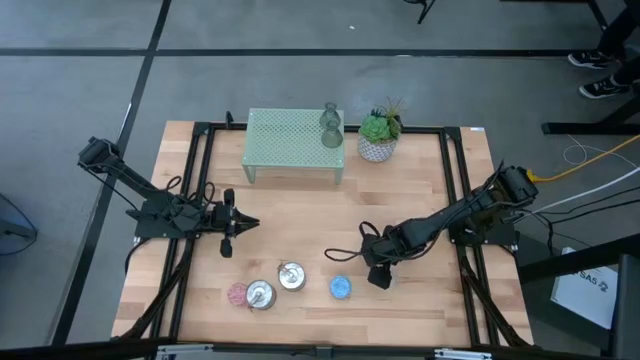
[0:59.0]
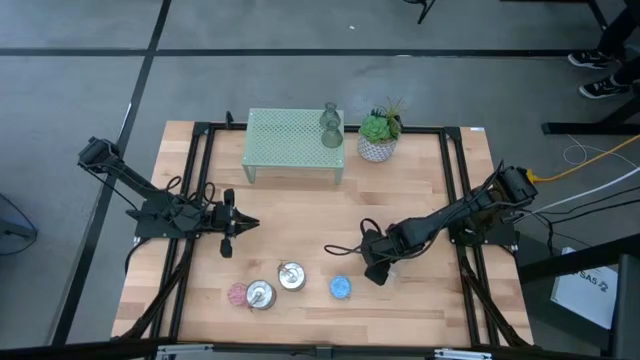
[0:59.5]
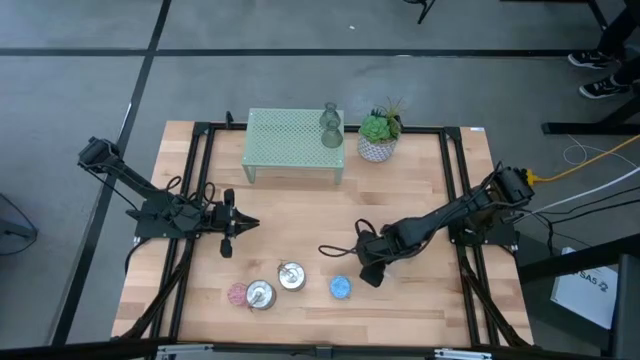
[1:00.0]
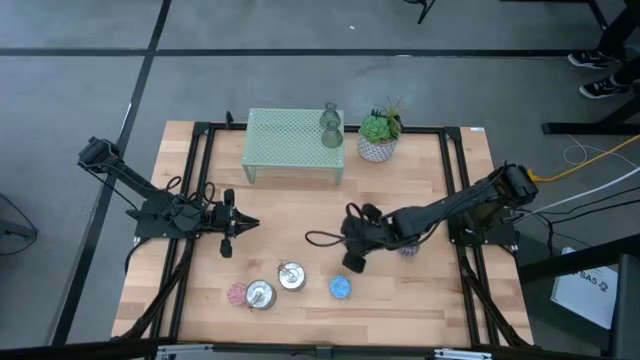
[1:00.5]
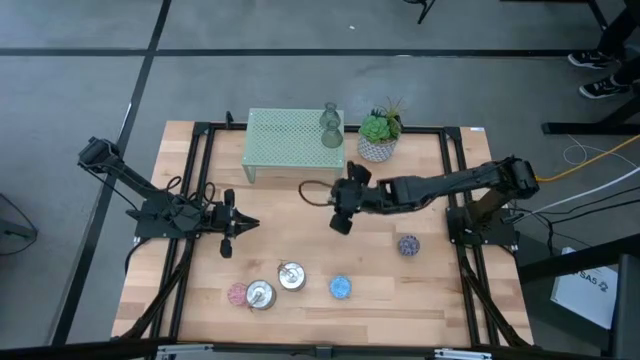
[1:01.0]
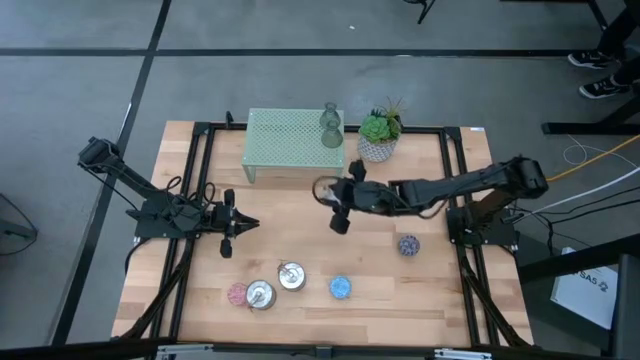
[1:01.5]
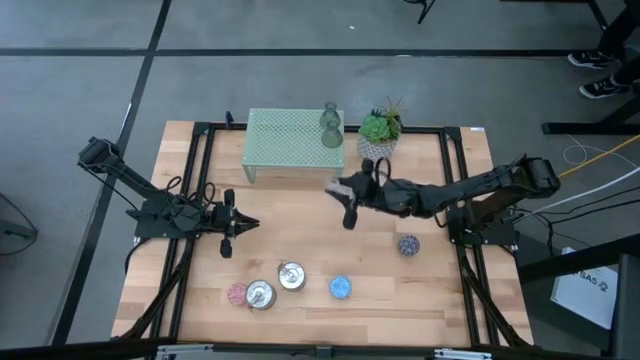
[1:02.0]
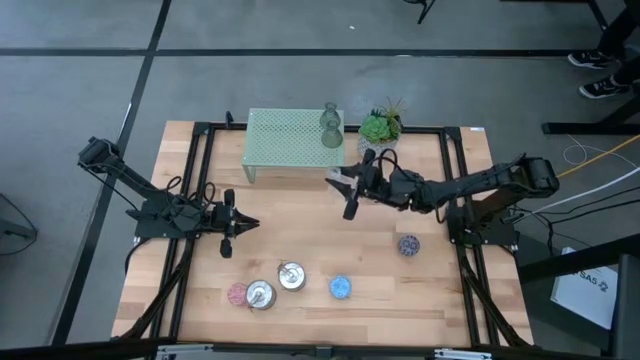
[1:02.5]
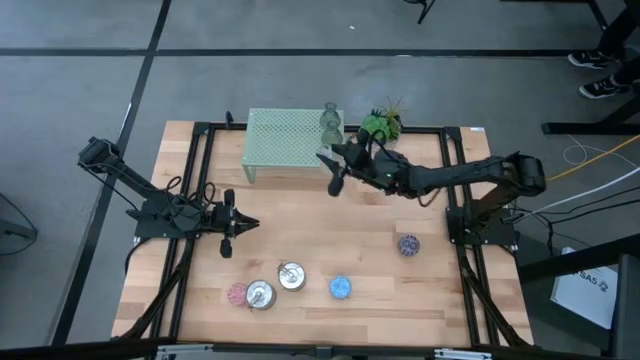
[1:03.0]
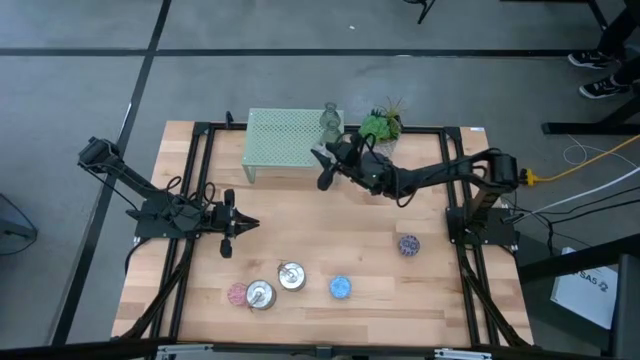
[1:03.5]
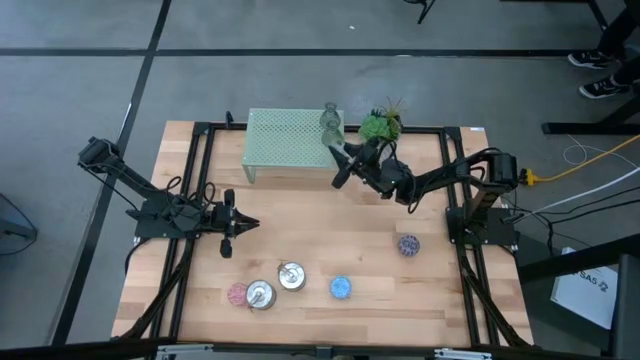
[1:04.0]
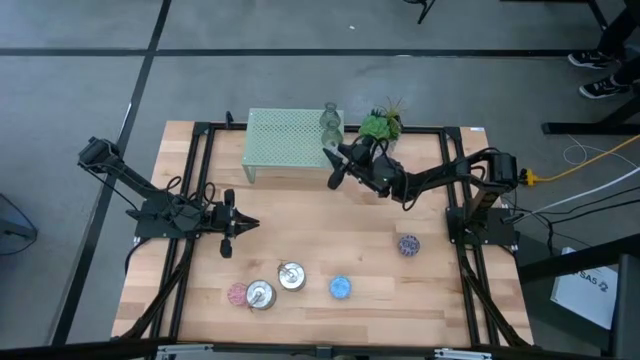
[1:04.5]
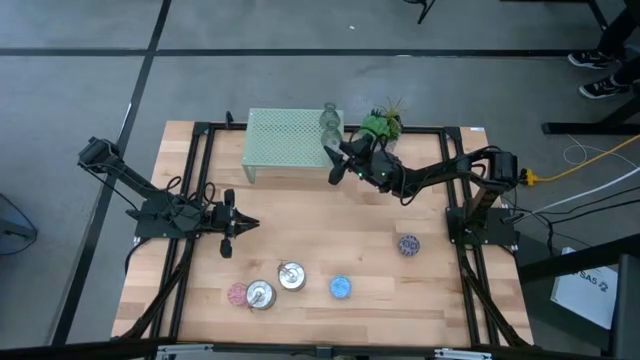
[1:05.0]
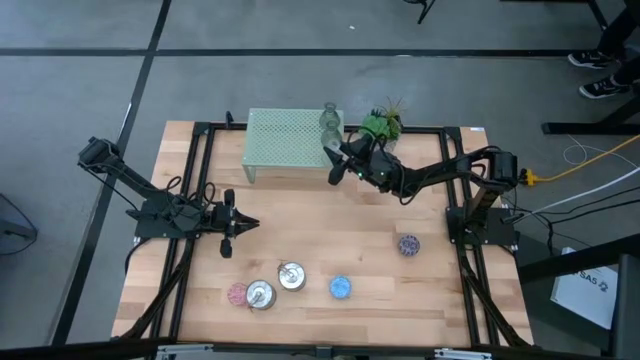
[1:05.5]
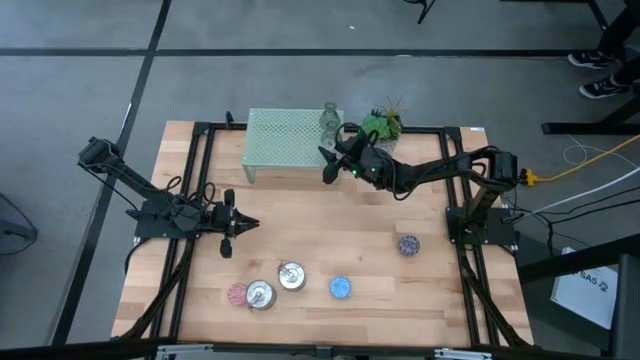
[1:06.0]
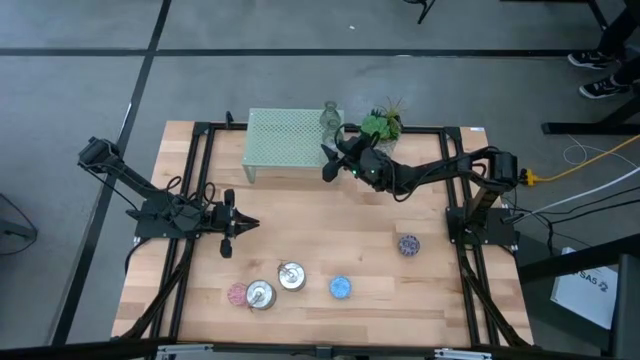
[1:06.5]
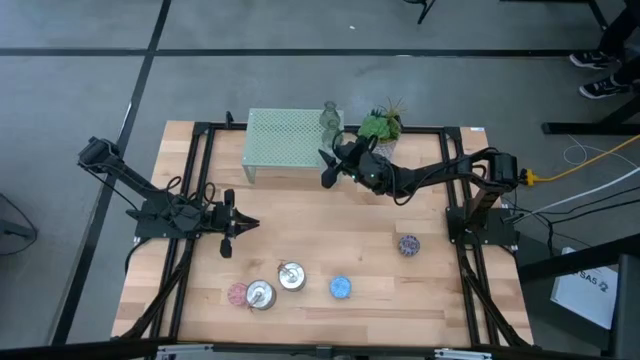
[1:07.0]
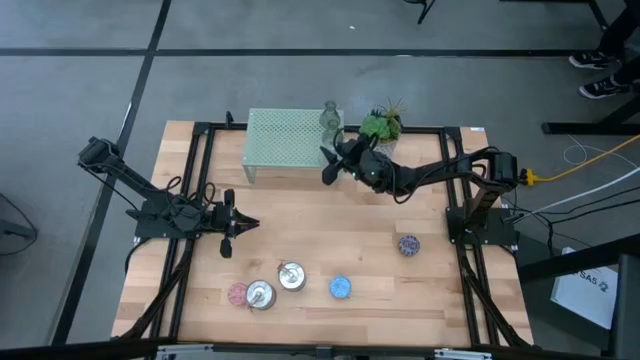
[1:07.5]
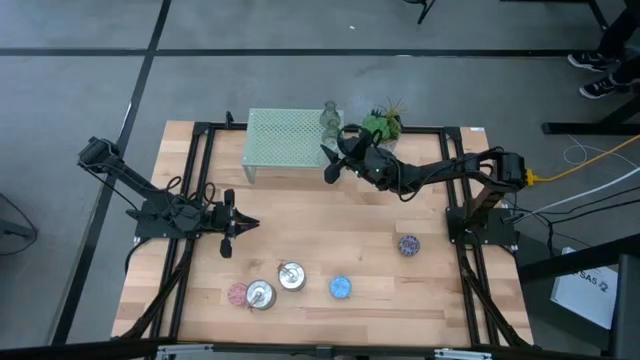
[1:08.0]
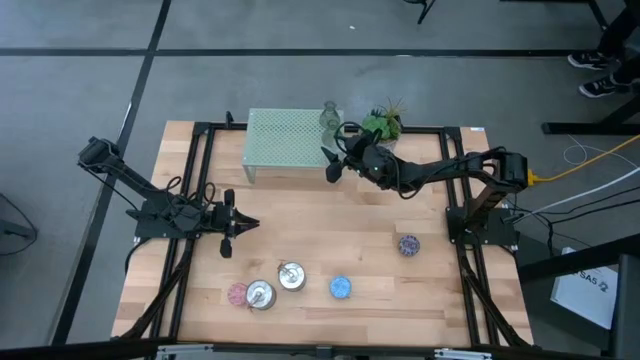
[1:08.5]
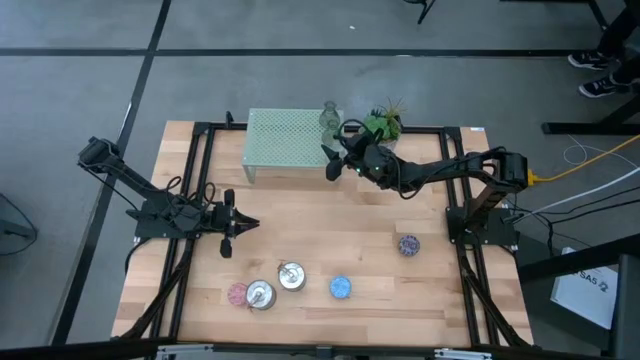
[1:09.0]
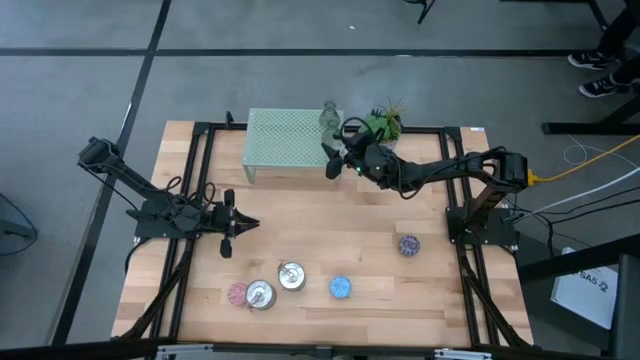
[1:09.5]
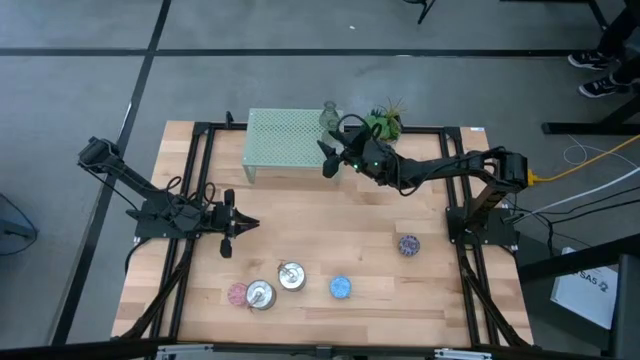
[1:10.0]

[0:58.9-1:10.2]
Task: Pick & Place candle stick holders
Put the transparent glass candle holder on the shelf

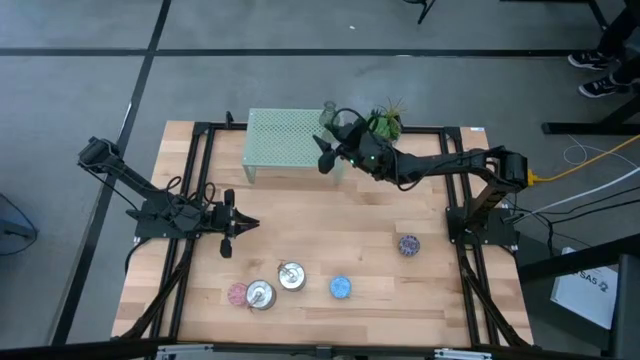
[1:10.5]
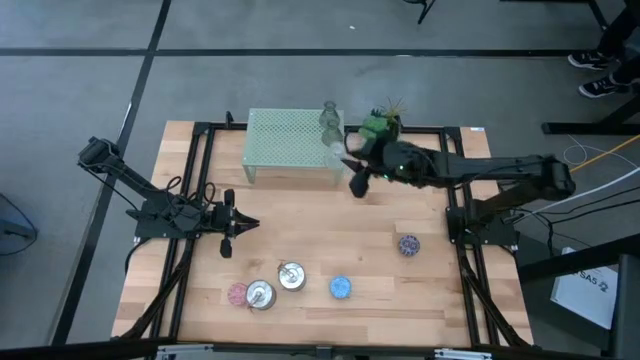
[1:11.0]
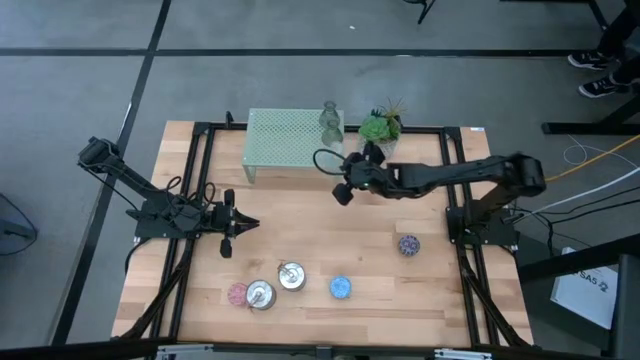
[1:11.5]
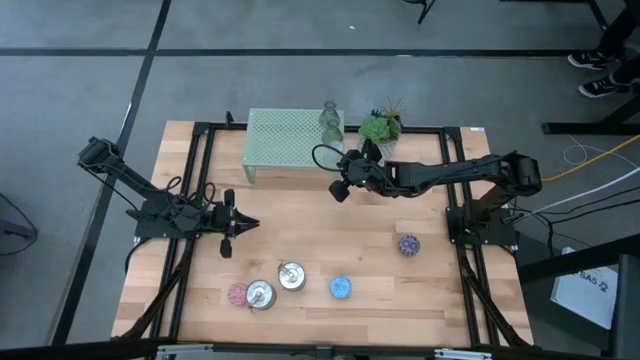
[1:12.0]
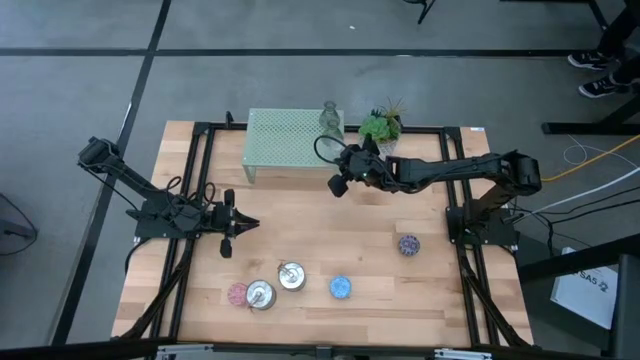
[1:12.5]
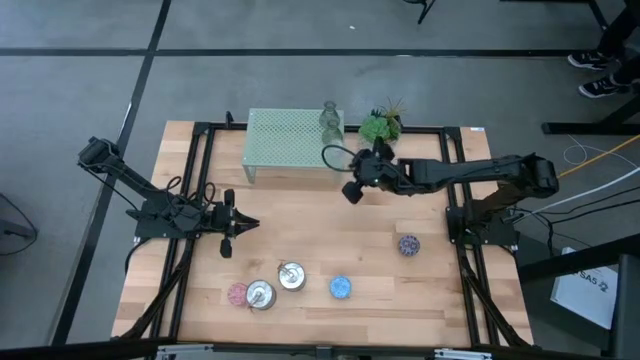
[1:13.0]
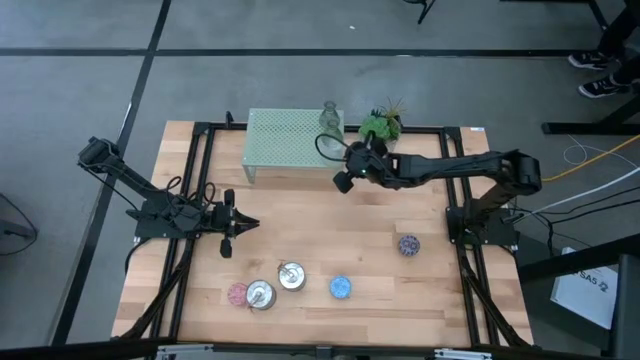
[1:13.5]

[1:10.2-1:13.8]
Adjust the transparent glass candle holder on the shelf

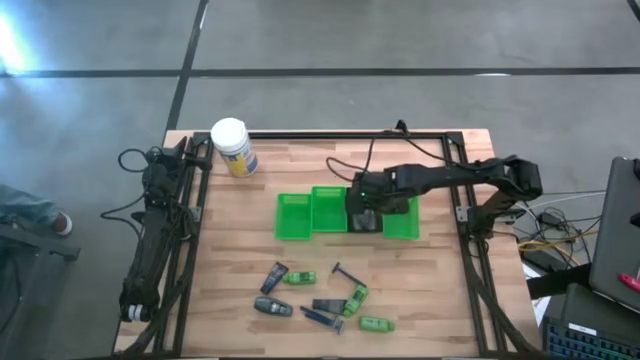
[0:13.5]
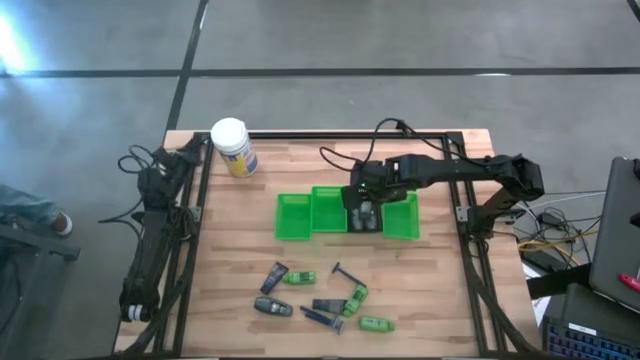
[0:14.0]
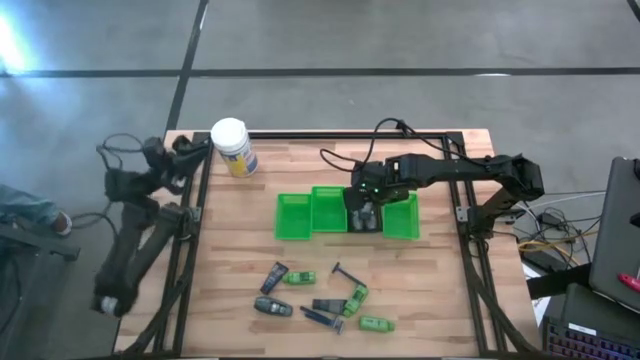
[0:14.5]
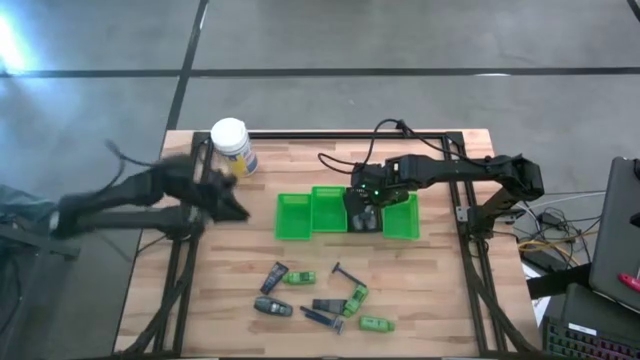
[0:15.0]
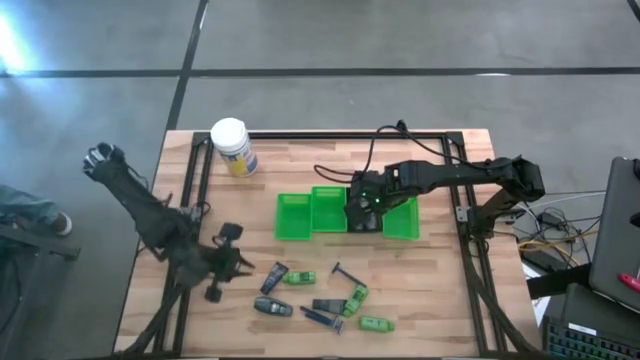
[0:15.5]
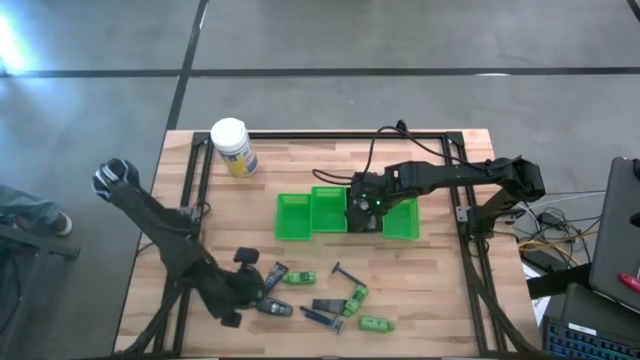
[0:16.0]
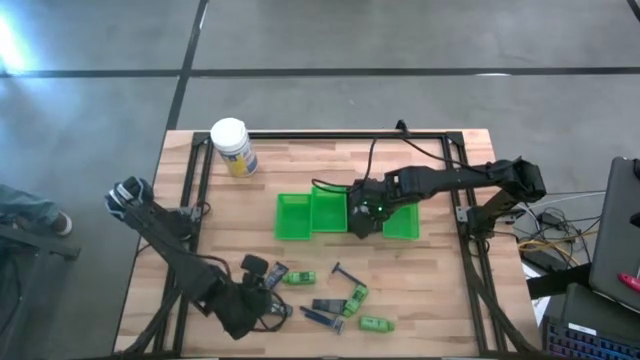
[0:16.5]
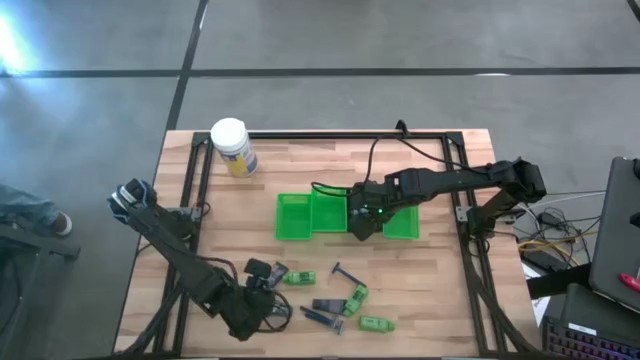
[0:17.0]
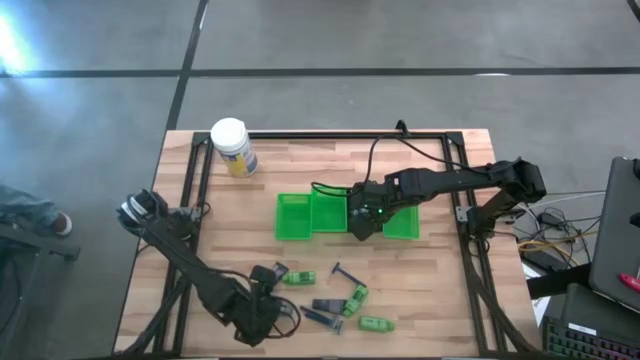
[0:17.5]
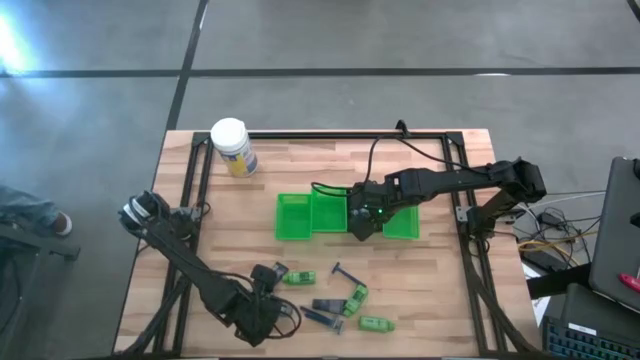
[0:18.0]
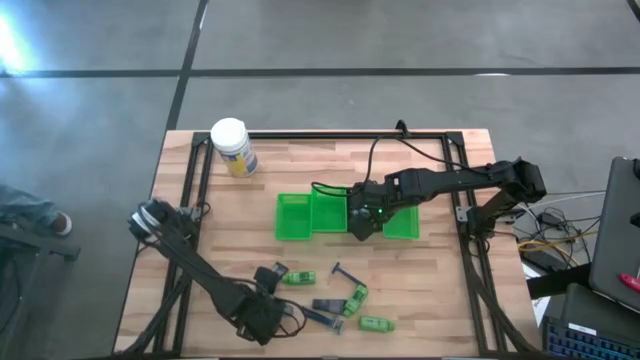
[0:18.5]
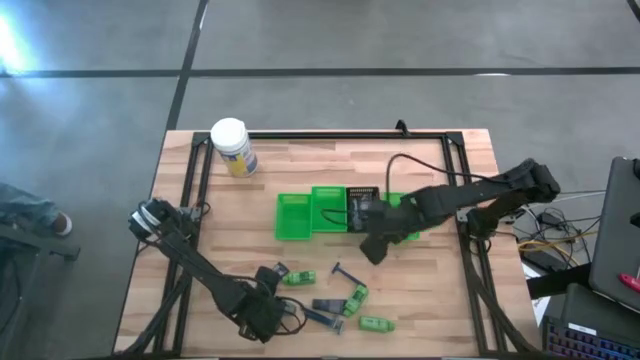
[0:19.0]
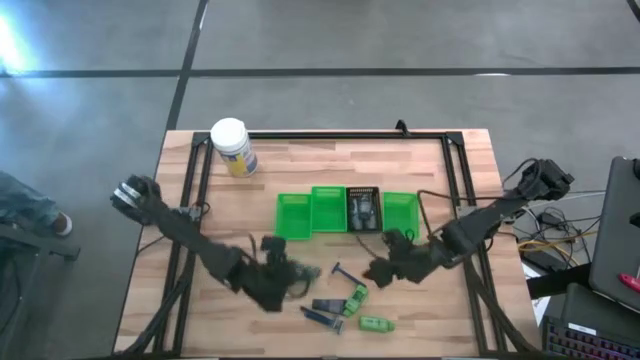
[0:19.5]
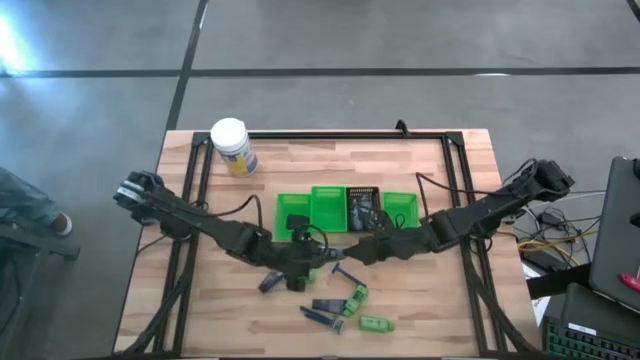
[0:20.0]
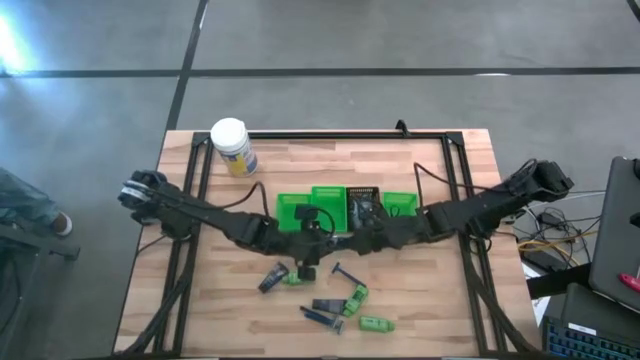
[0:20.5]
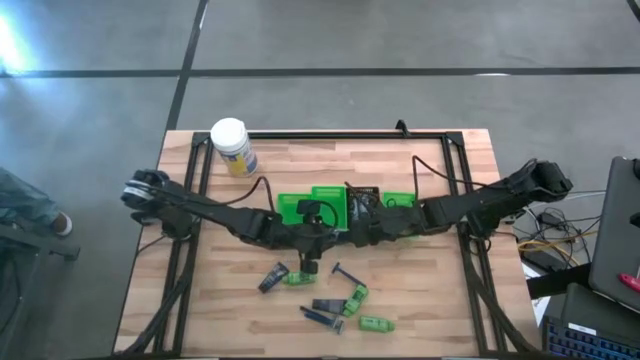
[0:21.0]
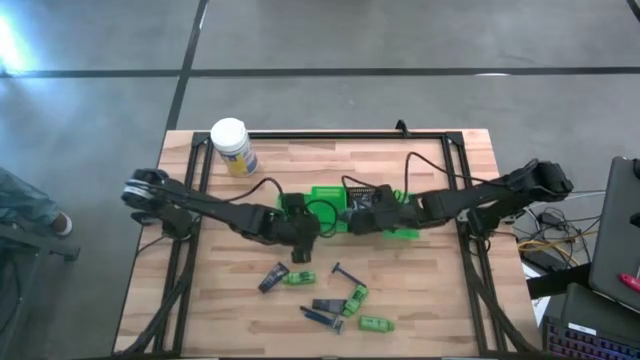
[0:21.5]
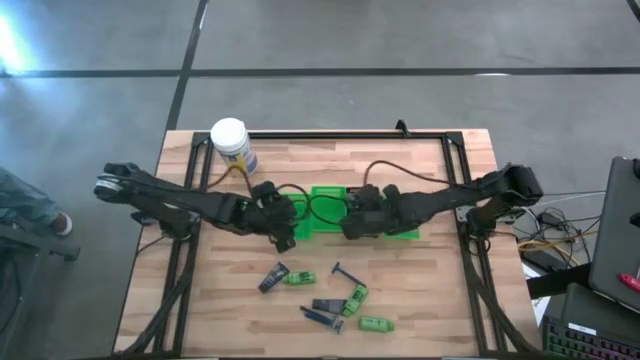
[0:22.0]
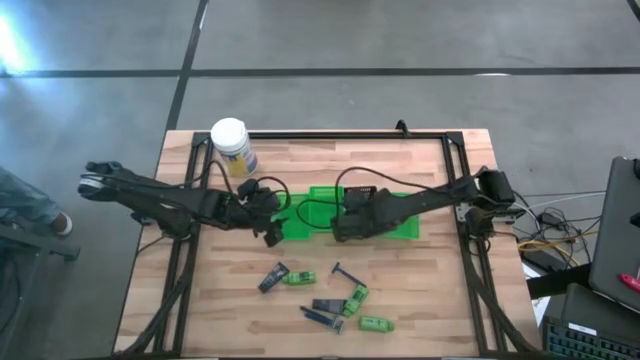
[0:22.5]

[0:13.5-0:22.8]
Task: Pick & Place Travel size toiletries
Put the gray deodorant into the black bin
